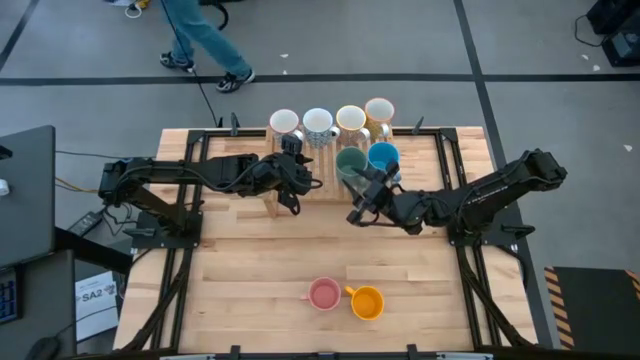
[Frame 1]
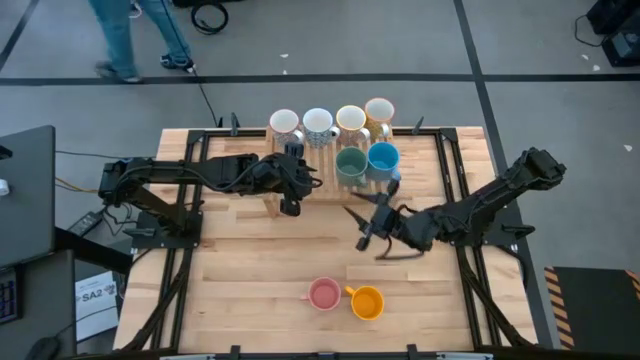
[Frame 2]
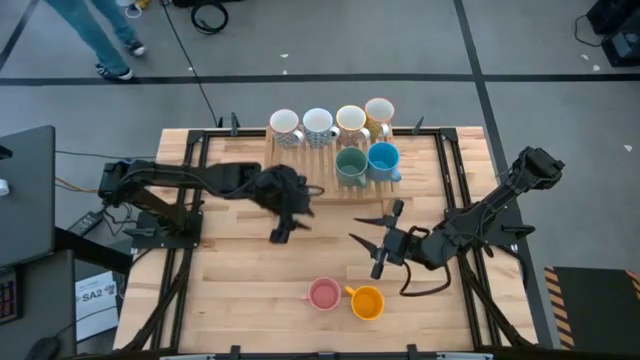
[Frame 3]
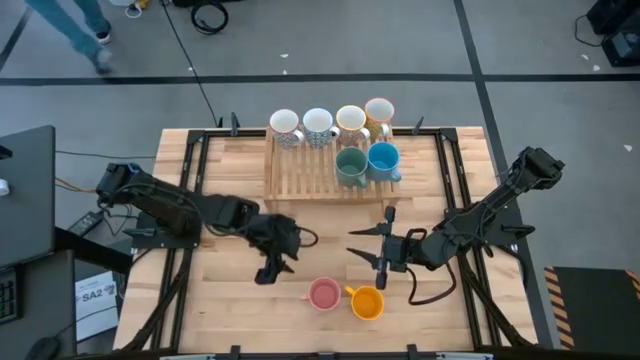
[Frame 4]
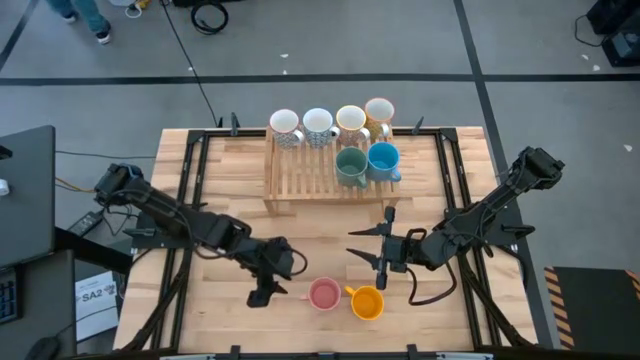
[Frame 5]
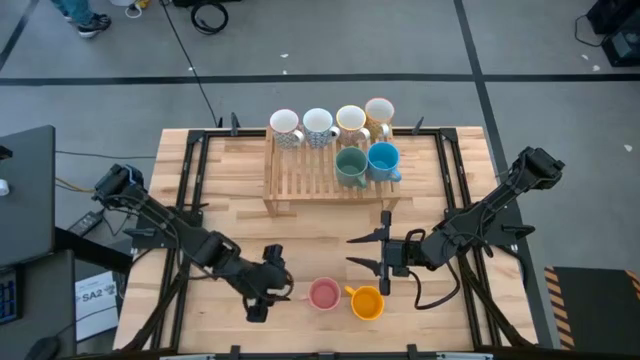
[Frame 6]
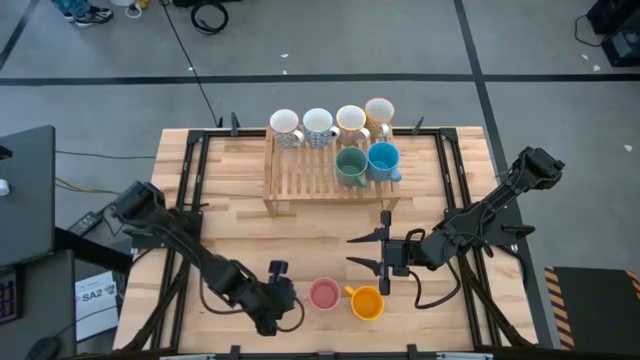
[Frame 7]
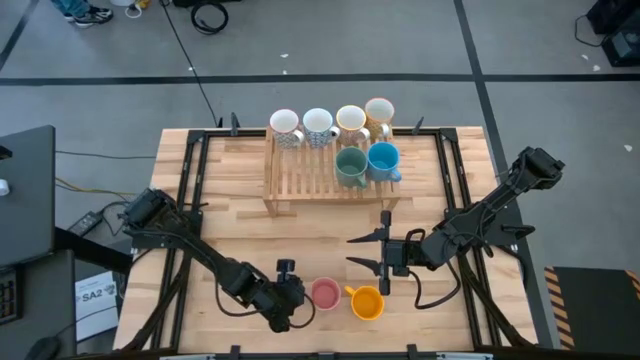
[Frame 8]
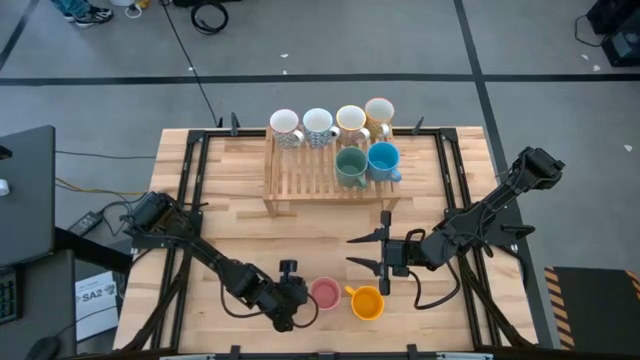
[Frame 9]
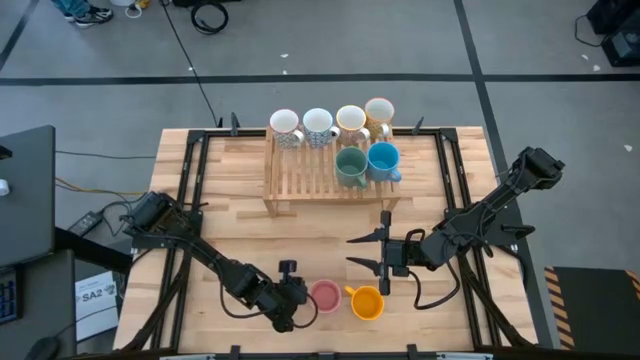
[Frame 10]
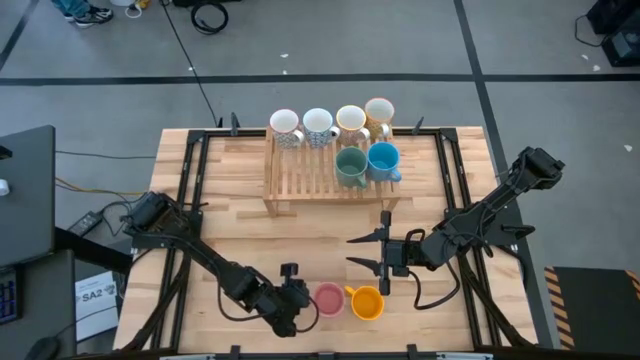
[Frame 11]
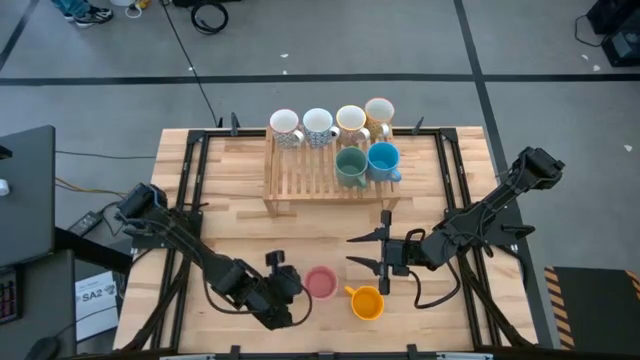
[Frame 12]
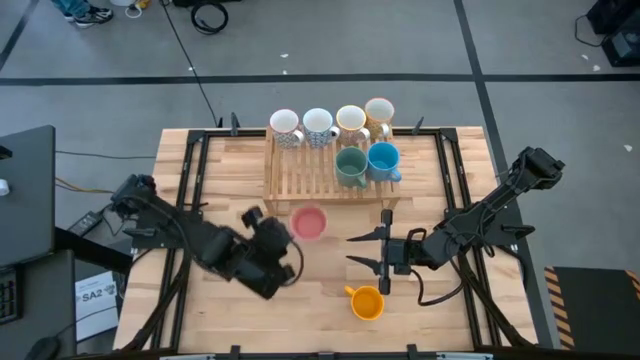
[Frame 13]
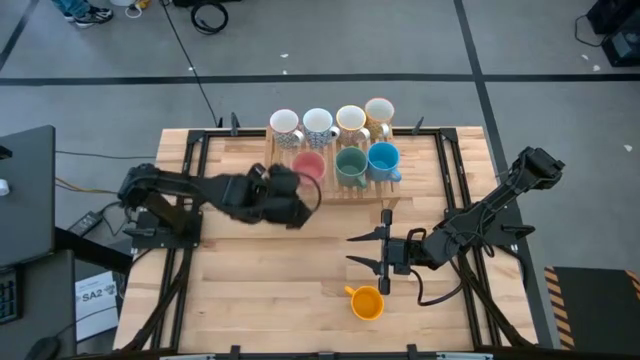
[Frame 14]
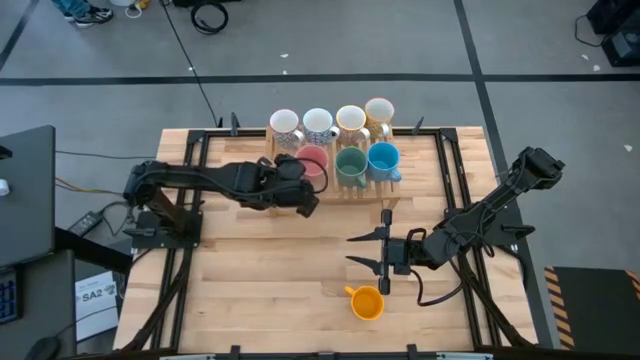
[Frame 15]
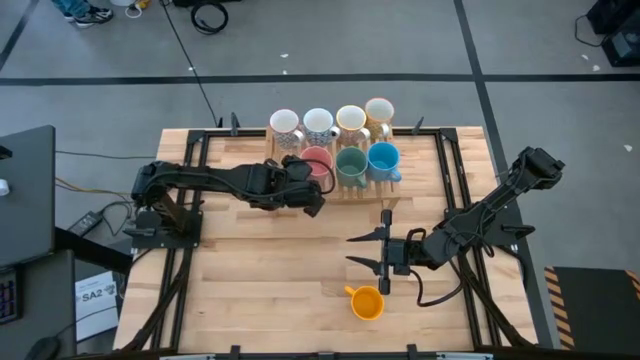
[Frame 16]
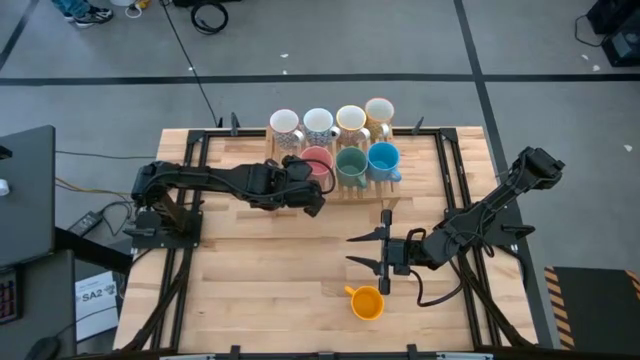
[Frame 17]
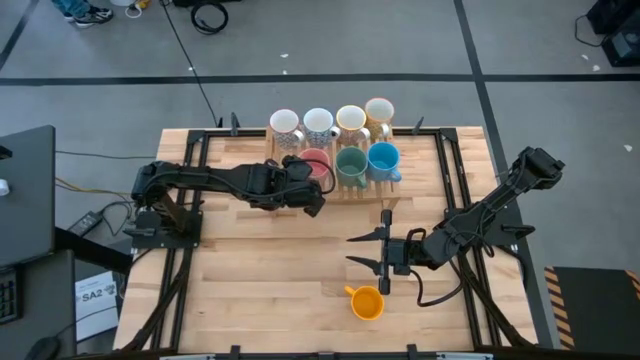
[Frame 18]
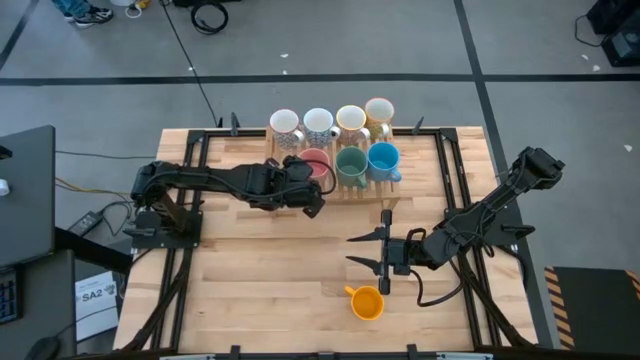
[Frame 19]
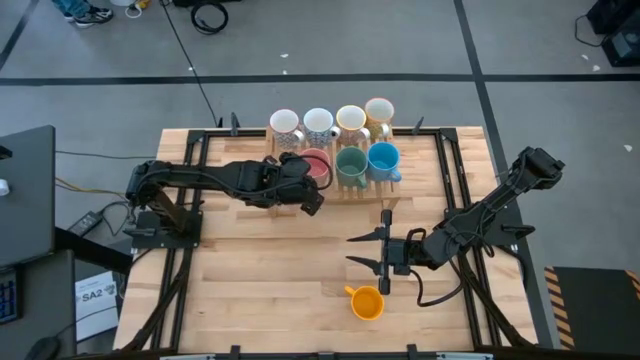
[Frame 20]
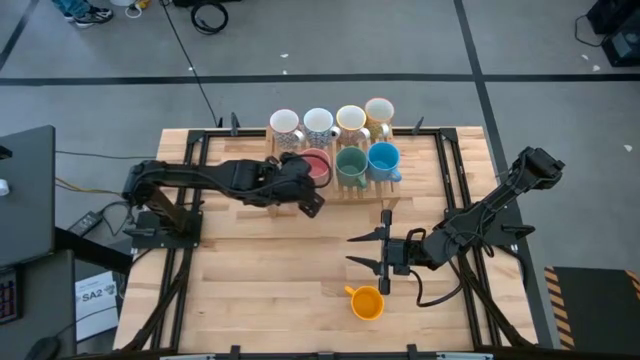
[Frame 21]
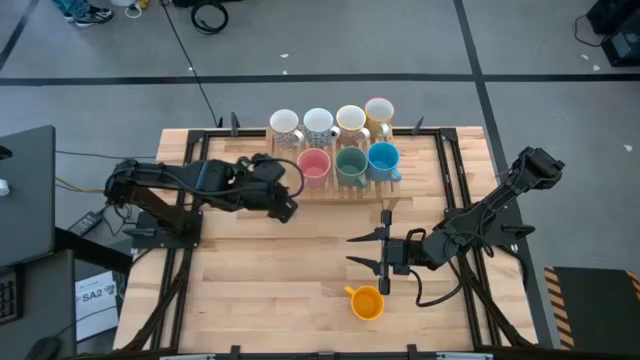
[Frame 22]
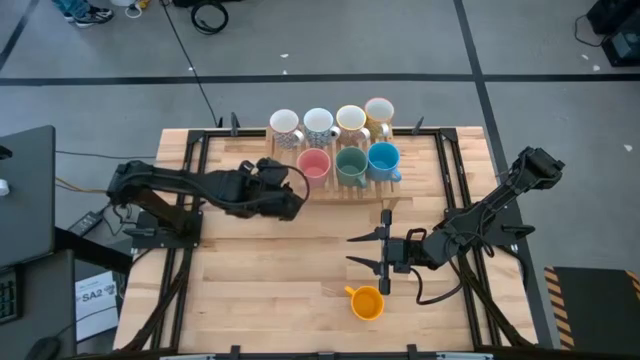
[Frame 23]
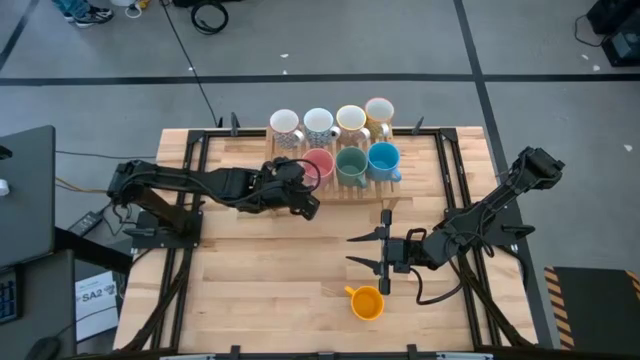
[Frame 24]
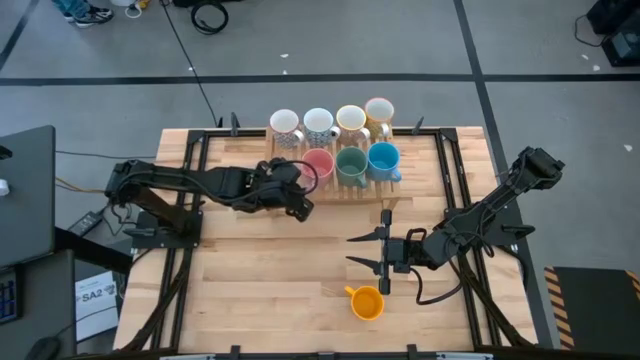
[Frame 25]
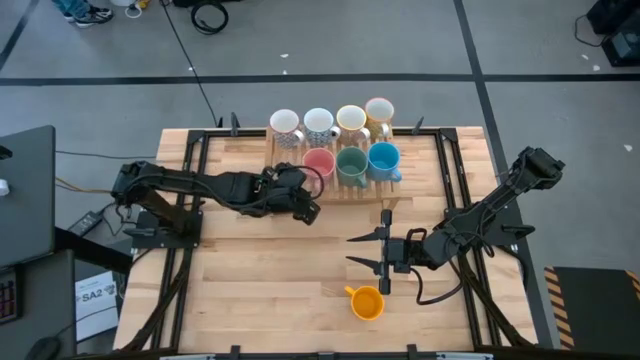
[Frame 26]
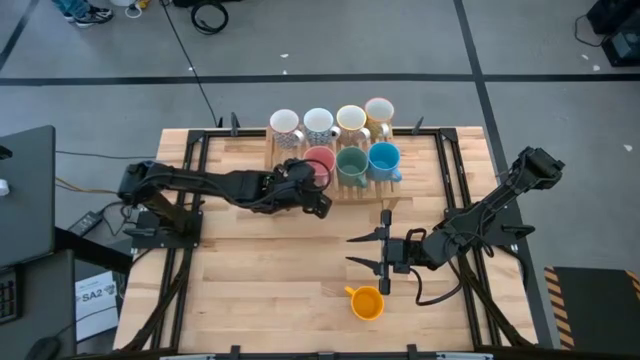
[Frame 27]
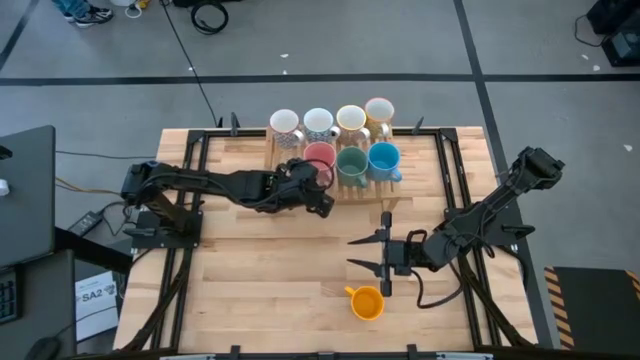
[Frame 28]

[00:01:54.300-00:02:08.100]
Task: Place coffee mugs
Put the pink mug on the shelf aligned with the left blue mug

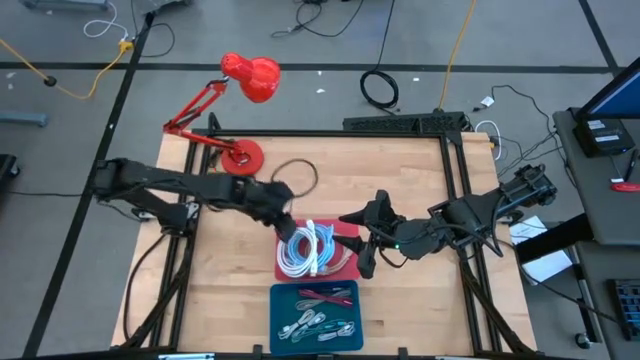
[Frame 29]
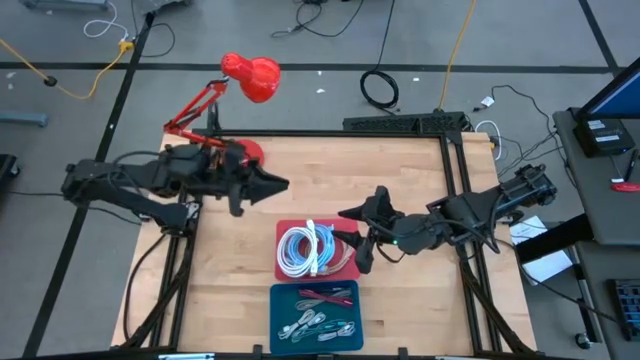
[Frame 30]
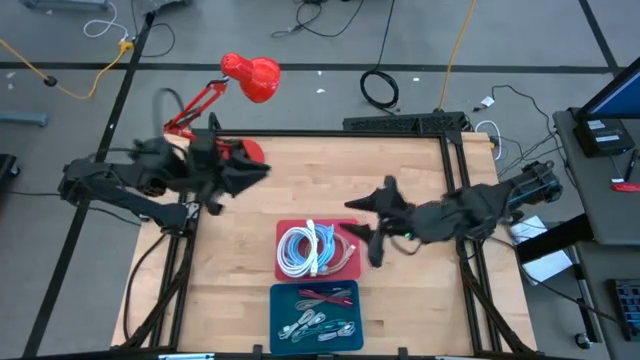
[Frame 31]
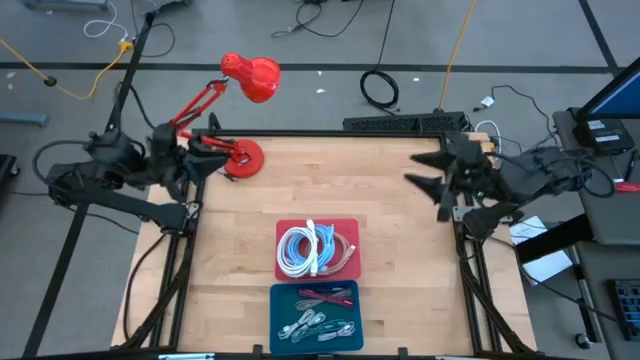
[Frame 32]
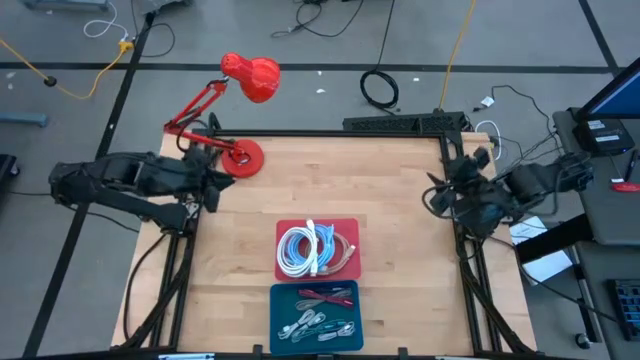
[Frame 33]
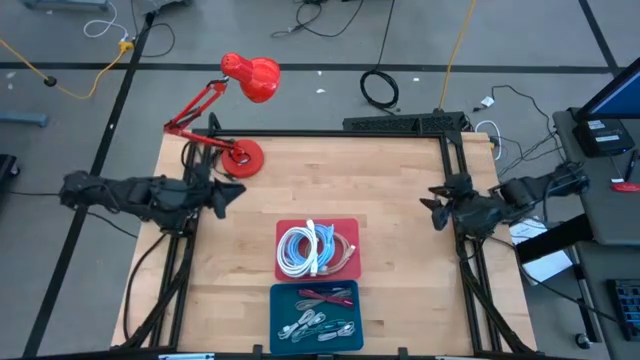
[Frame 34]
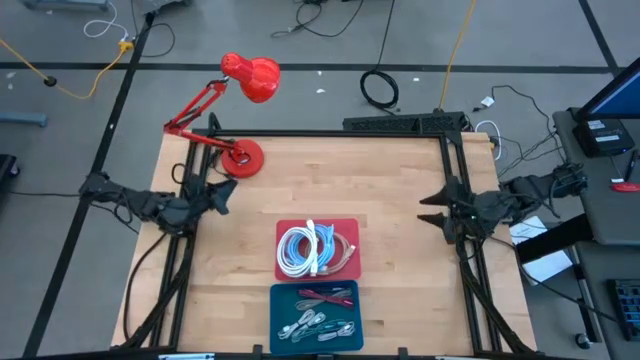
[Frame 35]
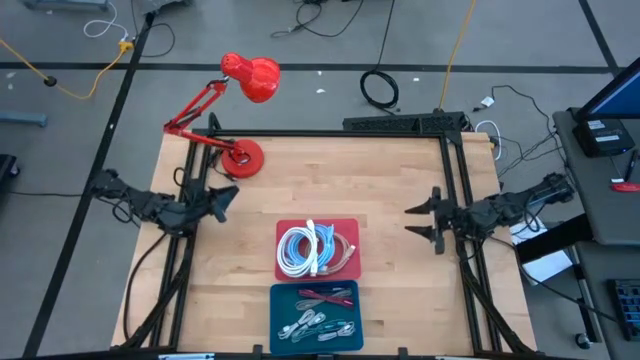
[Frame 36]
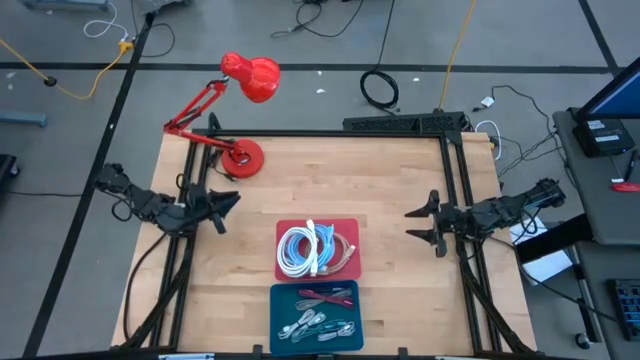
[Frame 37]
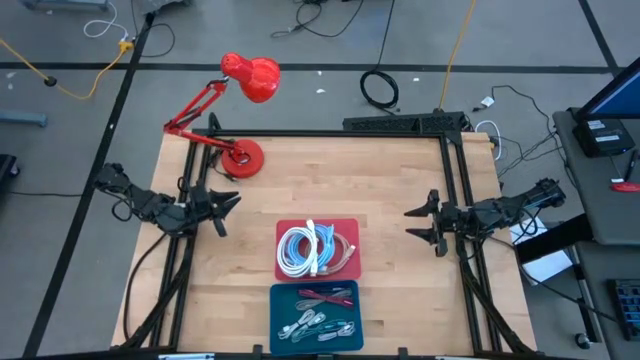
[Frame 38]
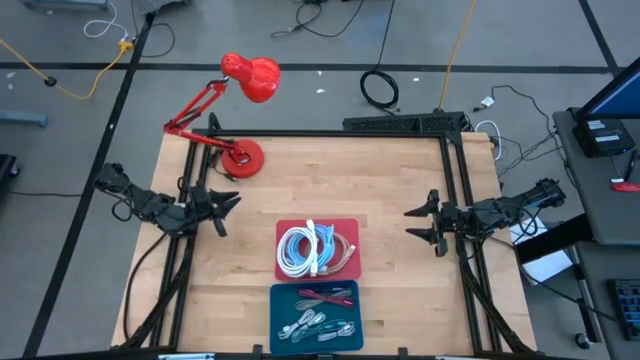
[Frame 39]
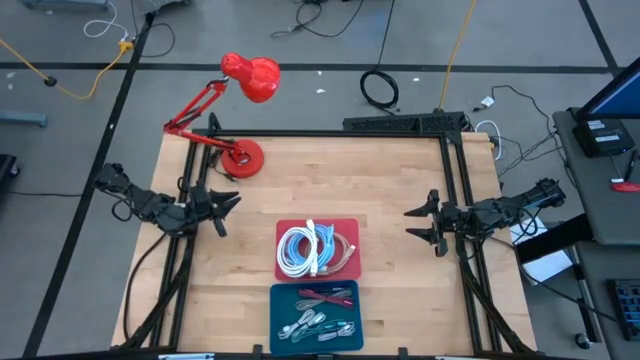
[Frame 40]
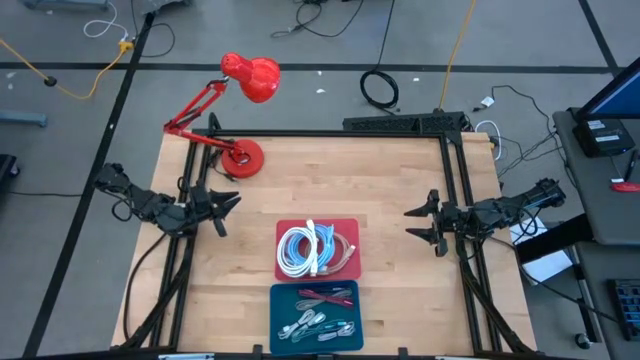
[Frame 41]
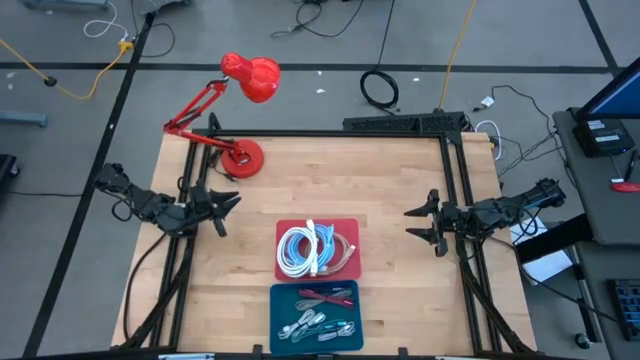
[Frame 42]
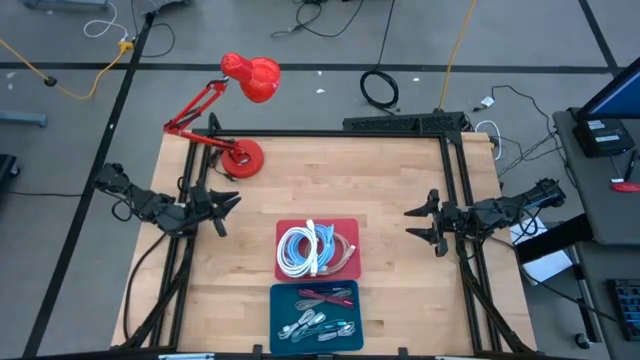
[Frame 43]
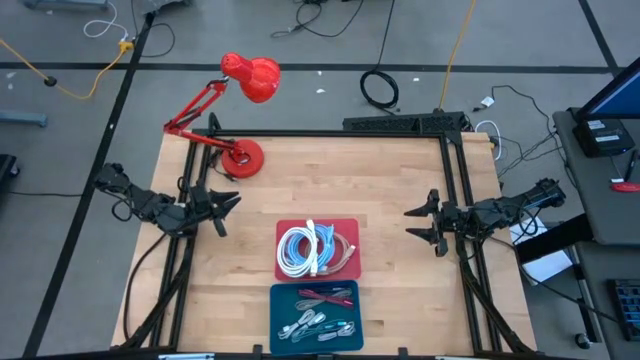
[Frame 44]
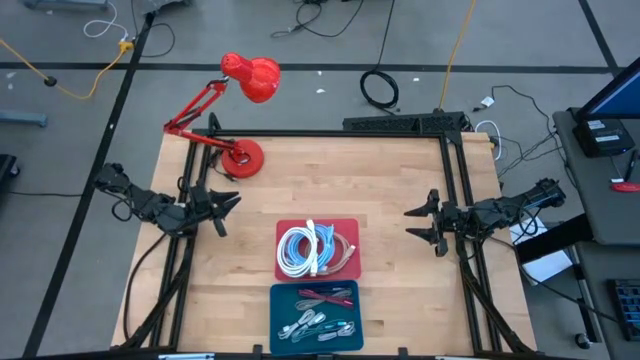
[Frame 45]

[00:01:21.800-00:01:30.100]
Task: Pick & Place USB Port
Return to Home Position
